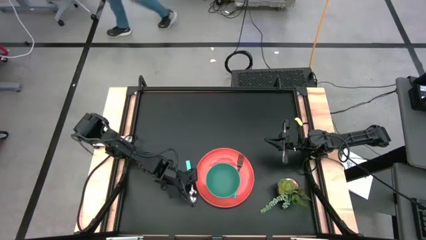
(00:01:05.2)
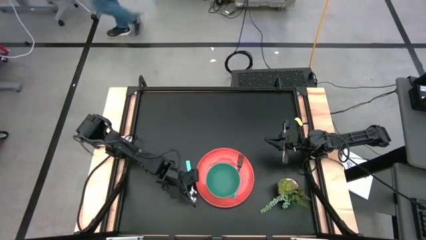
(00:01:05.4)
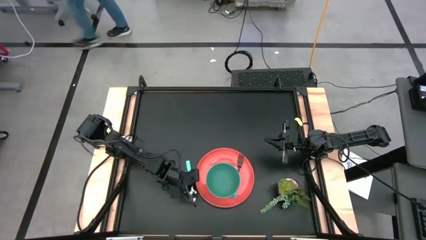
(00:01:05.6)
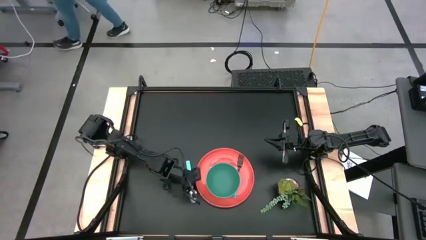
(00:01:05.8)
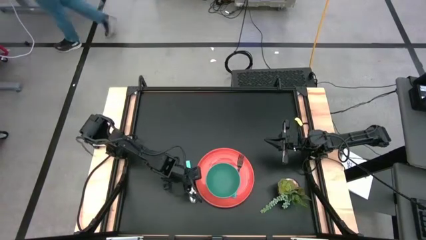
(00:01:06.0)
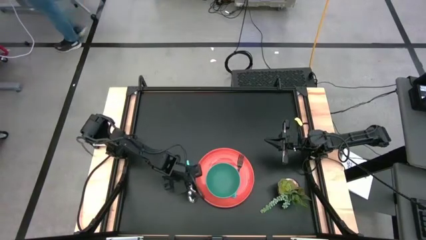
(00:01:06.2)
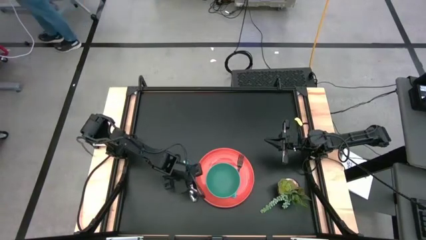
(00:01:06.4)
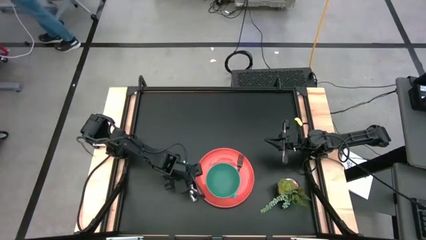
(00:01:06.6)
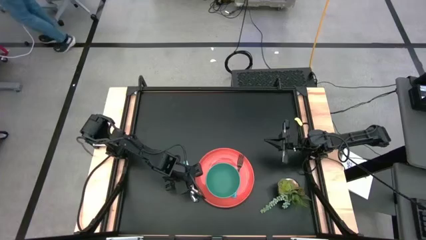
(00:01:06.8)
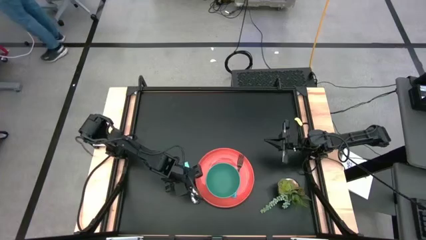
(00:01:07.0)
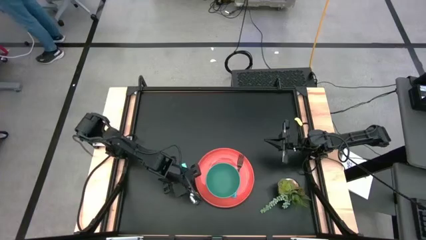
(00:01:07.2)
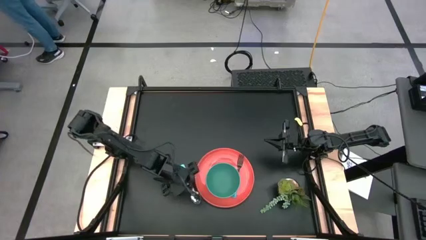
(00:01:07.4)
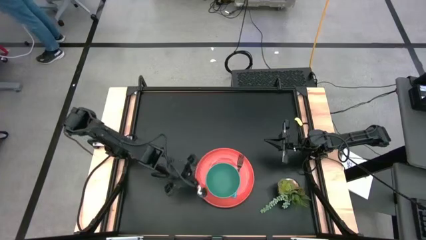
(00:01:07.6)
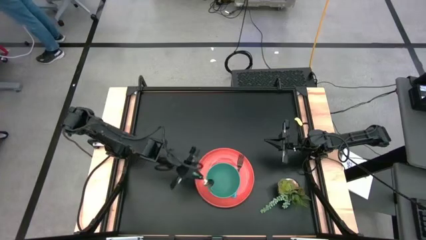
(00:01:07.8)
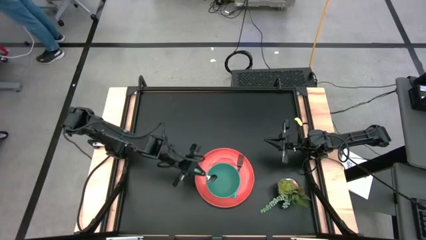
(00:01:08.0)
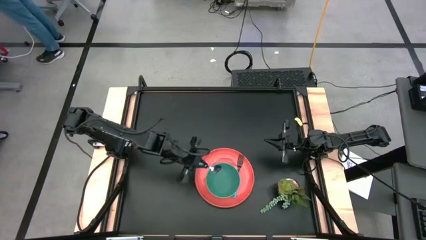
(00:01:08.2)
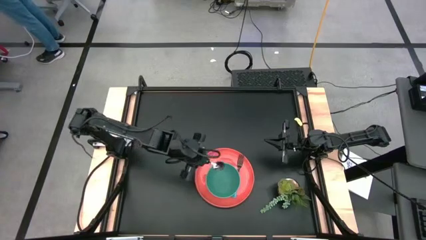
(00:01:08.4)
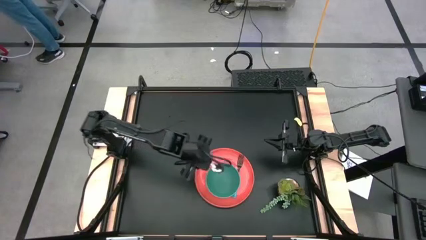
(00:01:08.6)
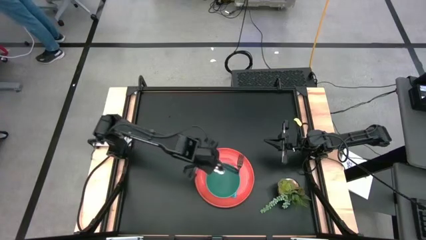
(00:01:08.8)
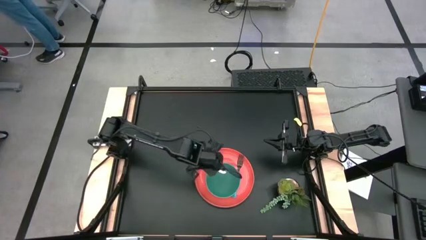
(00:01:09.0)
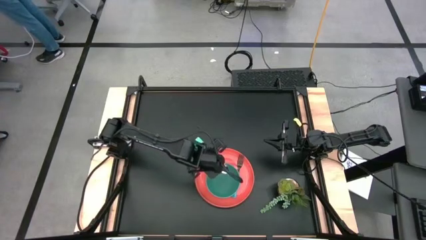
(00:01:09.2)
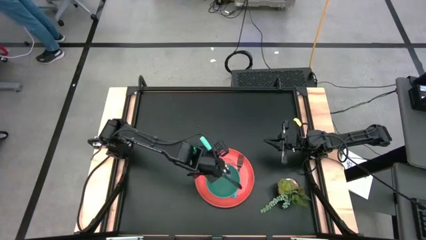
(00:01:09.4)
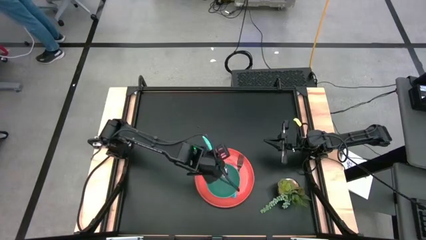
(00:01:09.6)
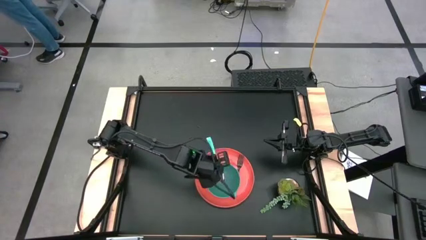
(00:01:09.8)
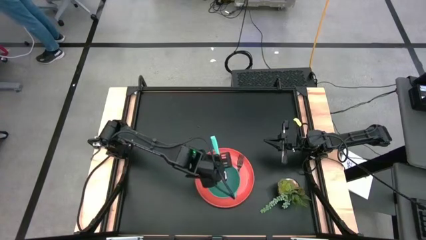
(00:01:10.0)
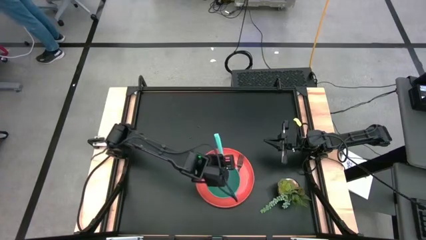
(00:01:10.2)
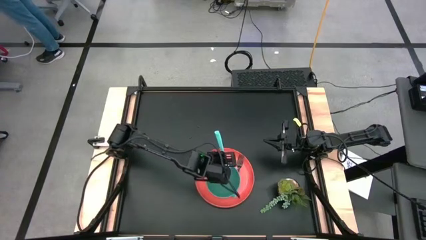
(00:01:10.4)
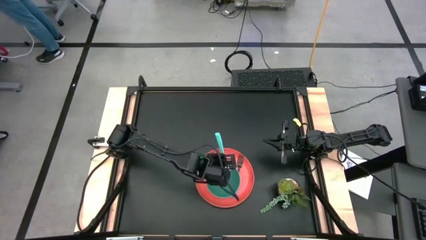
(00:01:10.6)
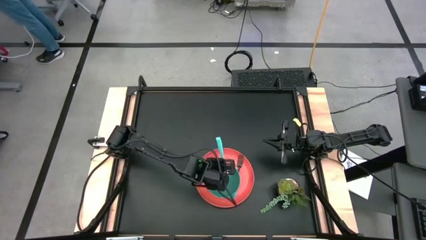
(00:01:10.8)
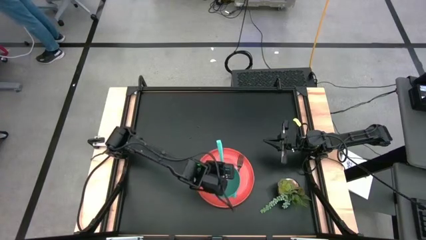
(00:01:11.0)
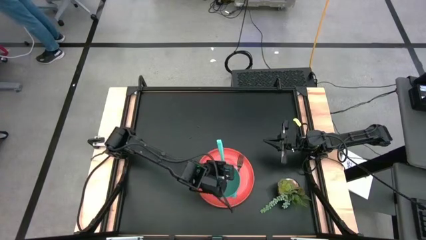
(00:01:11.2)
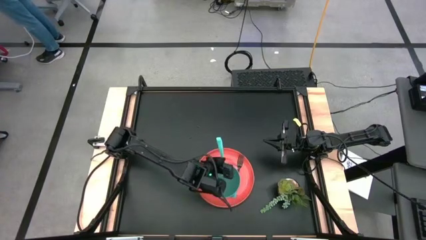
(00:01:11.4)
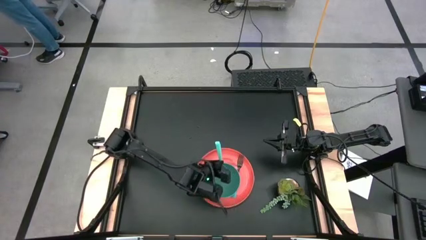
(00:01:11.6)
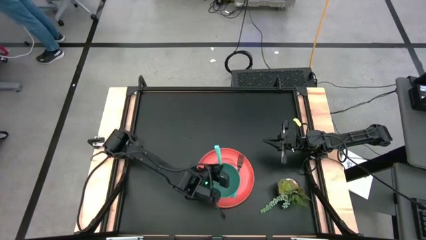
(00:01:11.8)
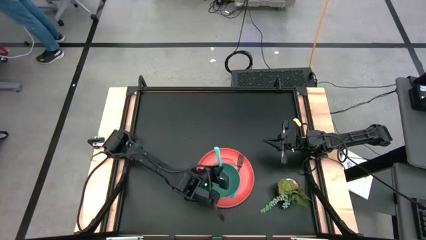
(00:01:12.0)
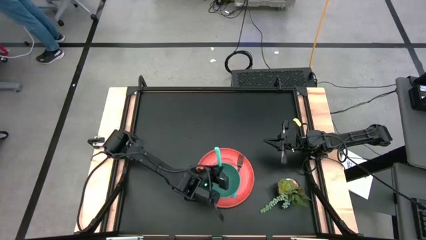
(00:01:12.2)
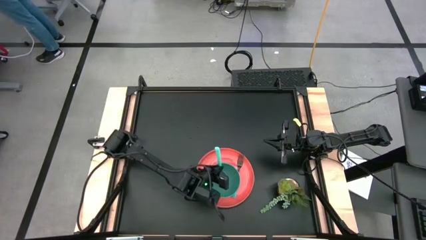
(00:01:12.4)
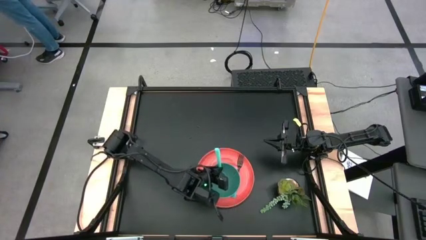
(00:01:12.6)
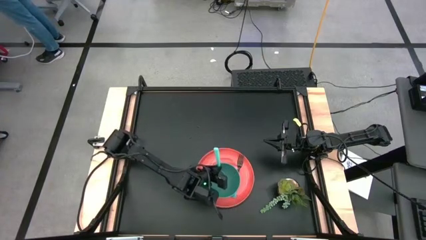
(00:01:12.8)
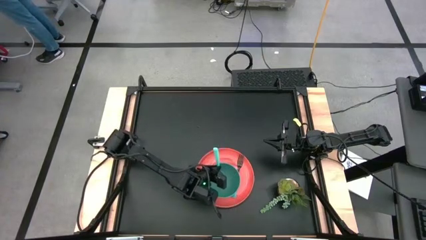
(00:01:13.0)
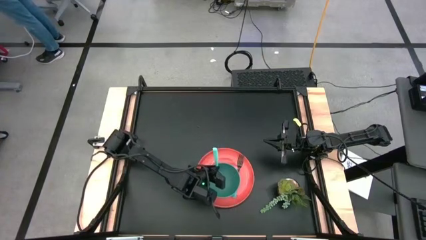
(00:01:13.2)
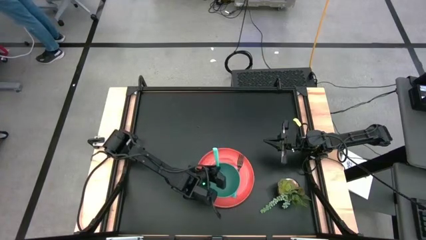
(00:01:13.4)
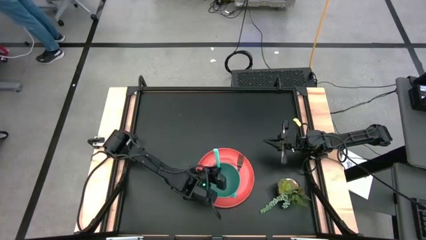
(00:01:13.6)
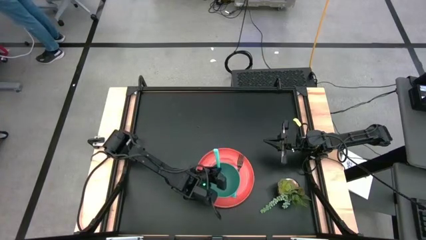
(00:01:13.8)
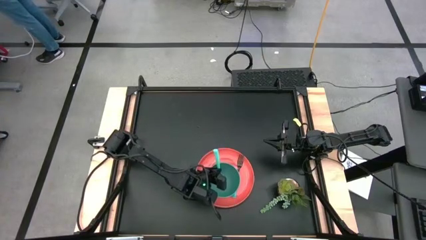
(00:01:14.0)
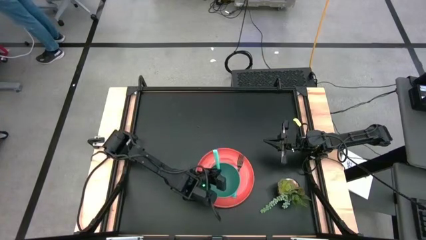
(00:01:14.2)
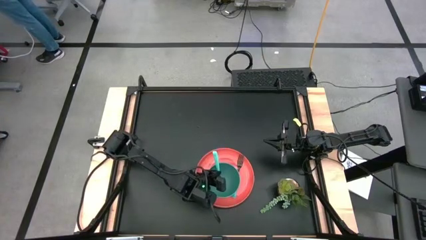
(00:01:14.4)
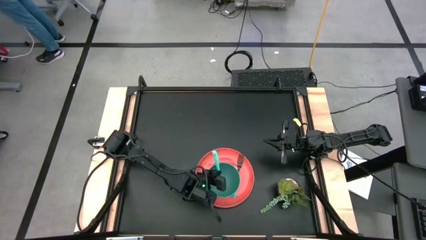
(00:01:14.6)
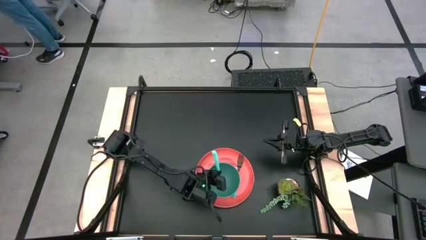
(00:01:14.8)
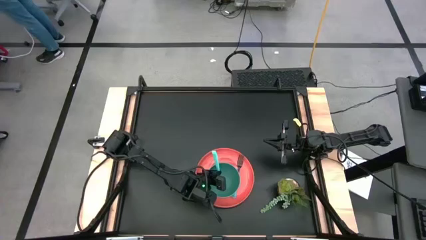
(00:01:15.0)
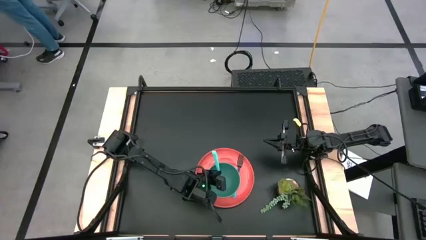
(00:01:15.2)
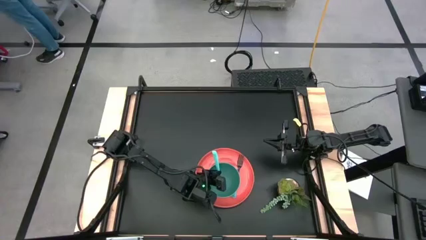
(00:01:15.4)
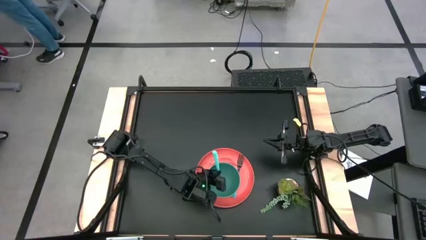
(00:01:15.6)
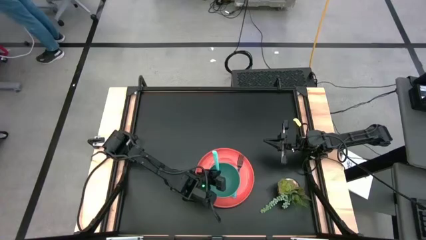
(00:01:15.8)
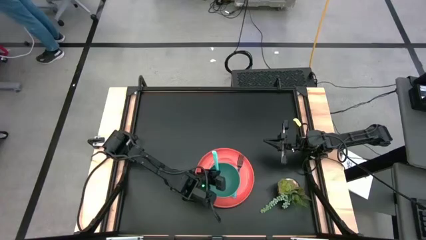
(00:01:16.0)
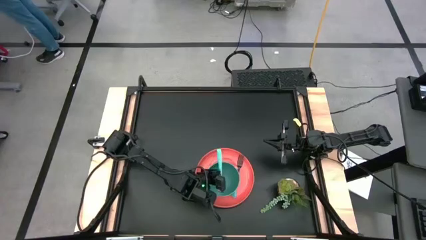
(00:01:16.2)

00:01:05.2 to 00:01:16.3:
Task: Set table place
Put the light green spoon into the green bowl
